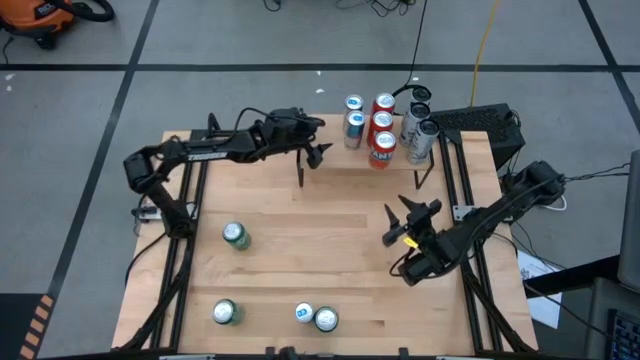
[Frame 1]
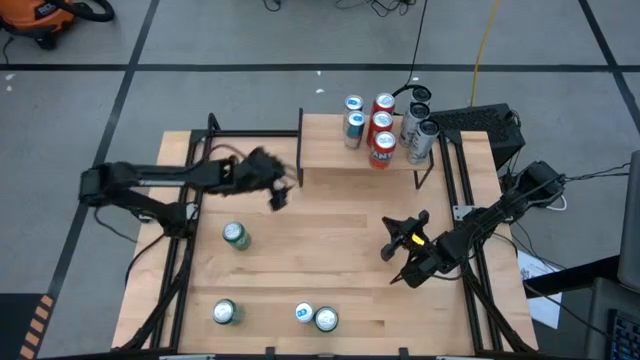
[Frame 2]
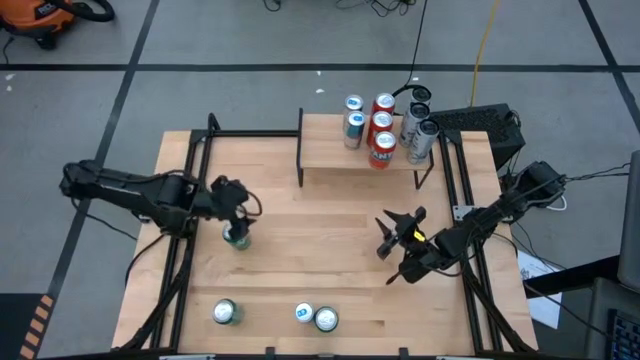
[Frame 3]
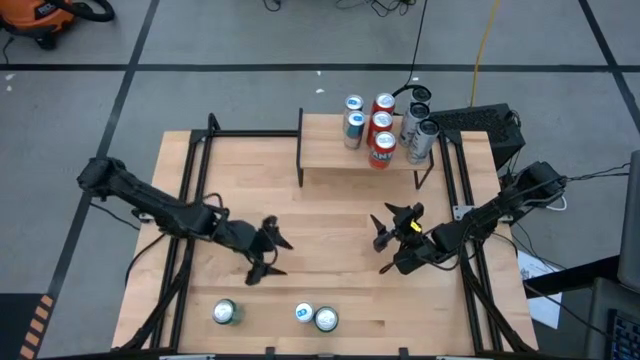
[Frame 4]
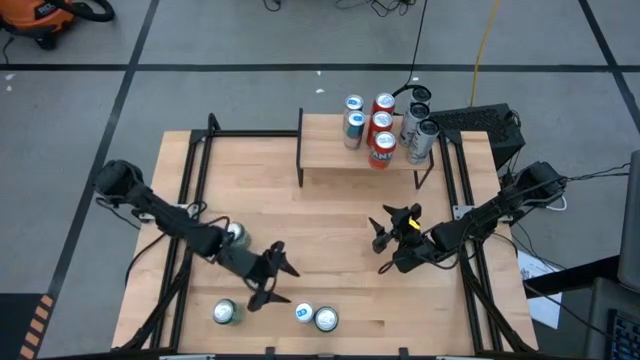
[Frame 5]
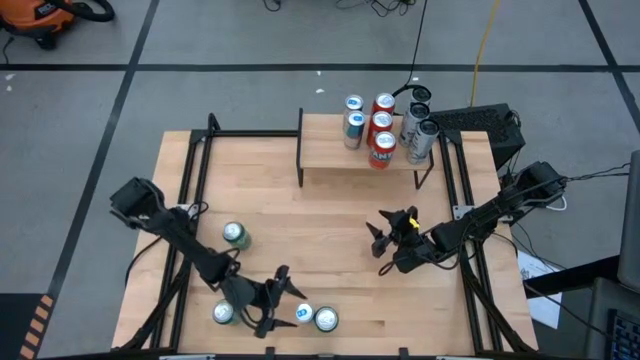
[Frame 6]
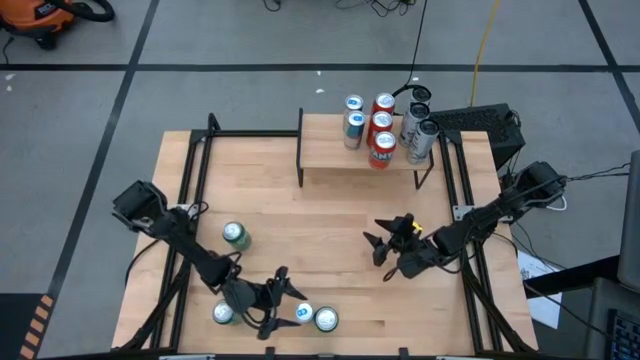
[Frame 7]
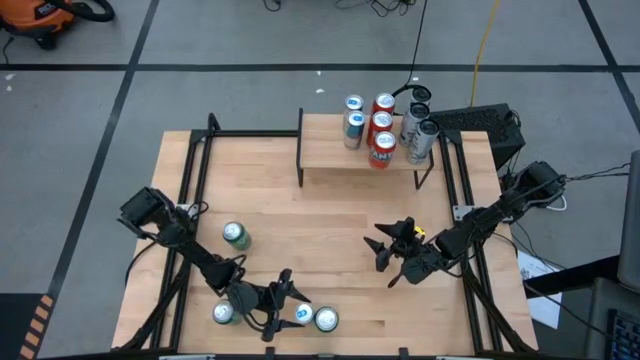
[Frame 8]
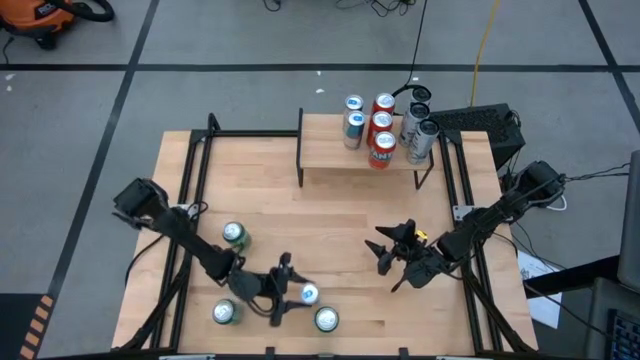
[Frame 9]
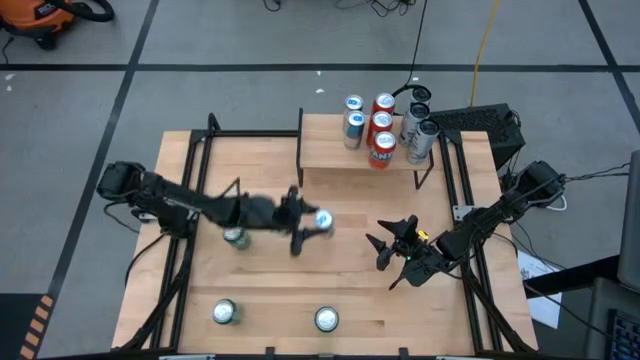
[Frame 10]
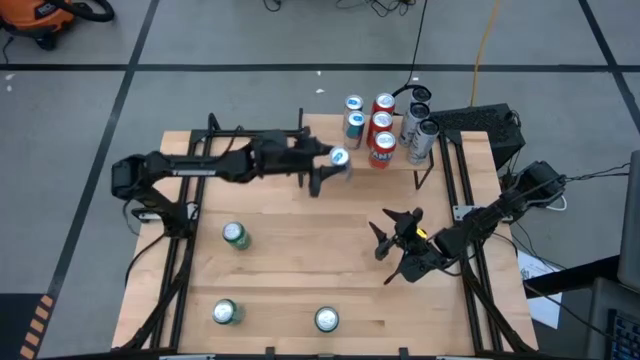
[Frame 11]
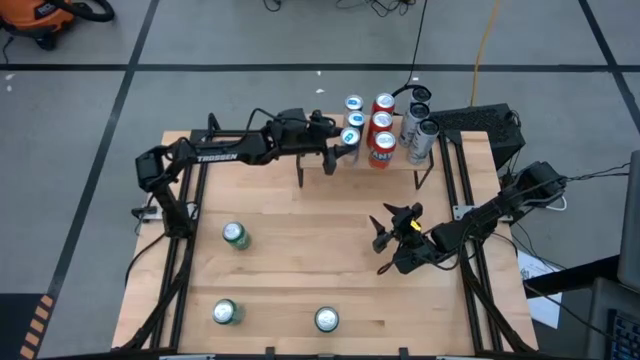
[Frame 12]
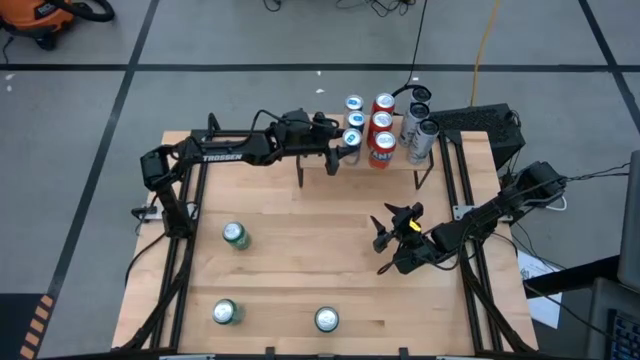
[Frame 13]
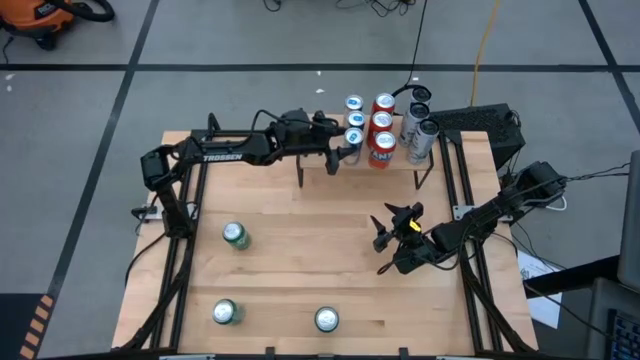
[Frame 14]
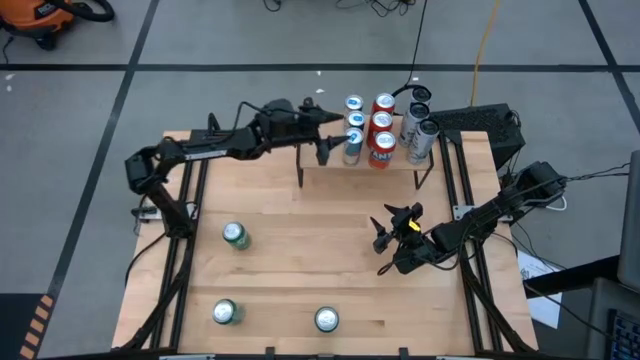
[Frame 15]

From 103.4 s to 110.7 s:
Task: Place canned beverage on shelf
Put the blue soda can on the shelf aligned with the other blue soda can

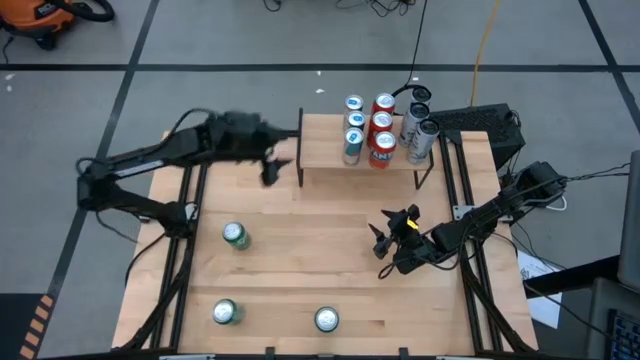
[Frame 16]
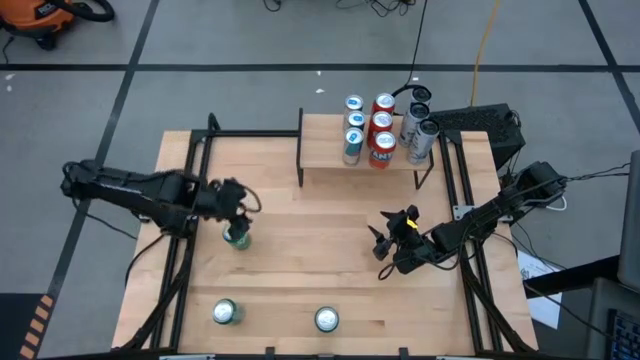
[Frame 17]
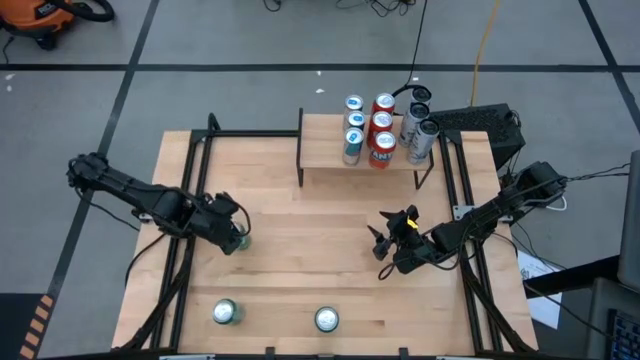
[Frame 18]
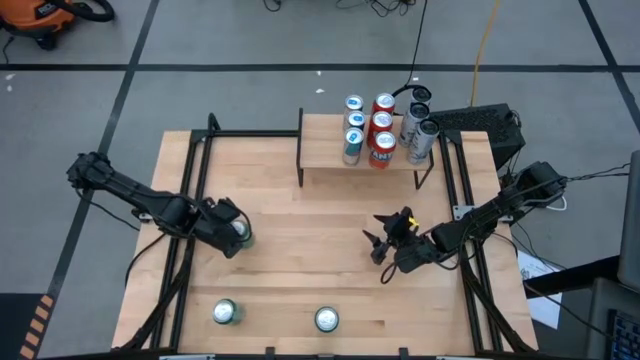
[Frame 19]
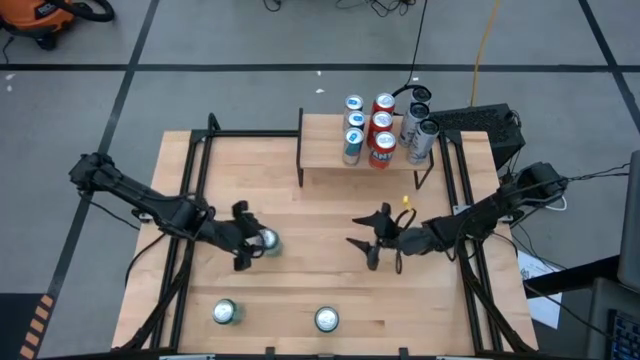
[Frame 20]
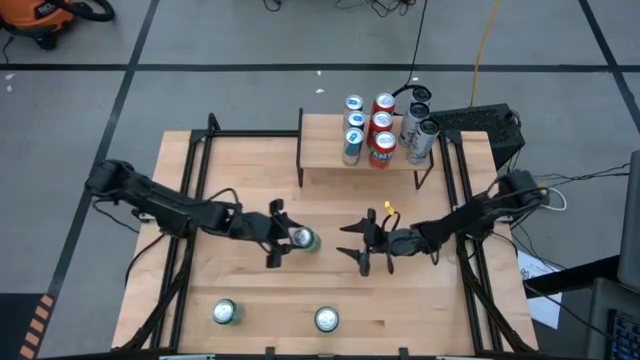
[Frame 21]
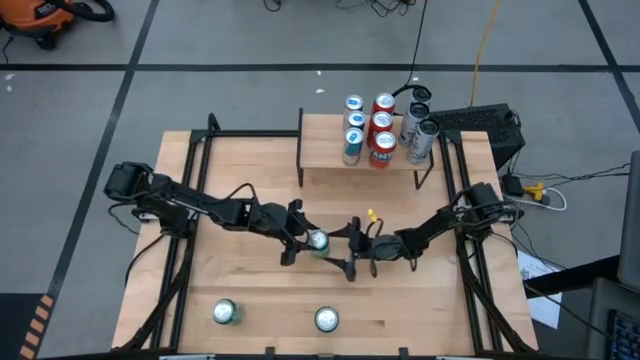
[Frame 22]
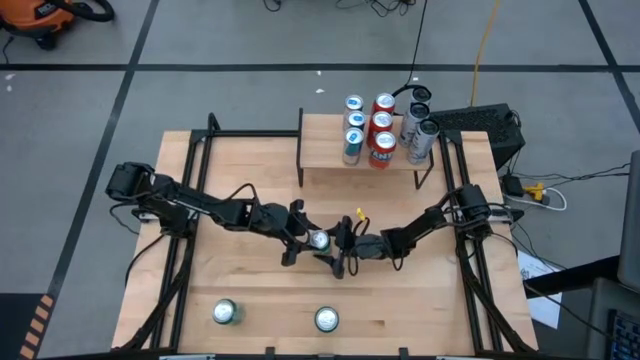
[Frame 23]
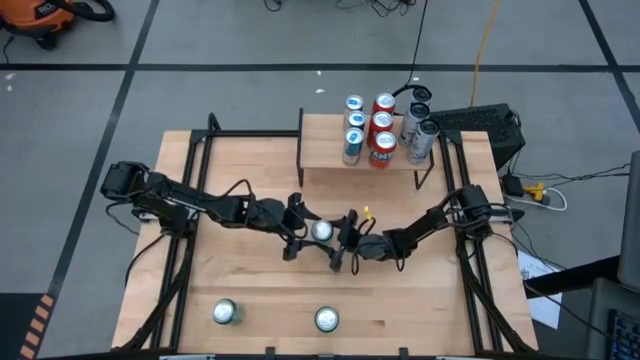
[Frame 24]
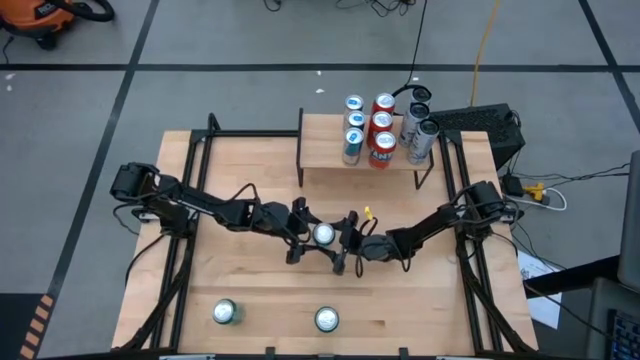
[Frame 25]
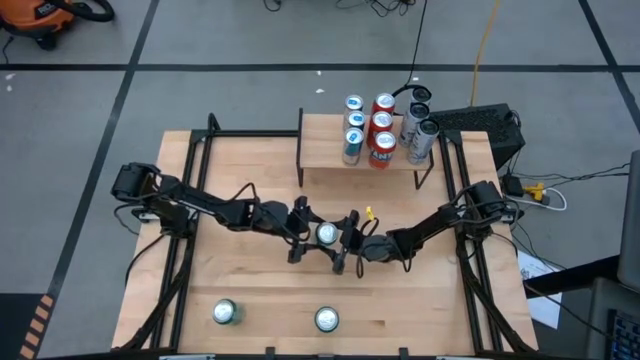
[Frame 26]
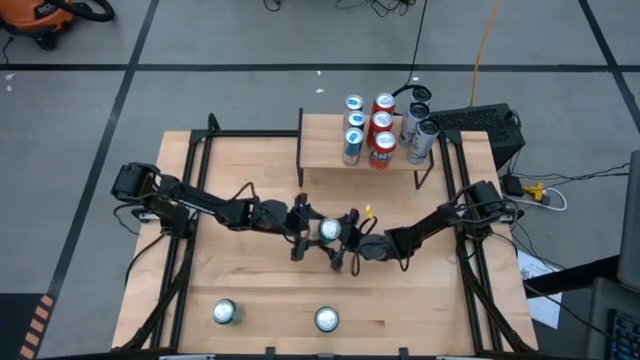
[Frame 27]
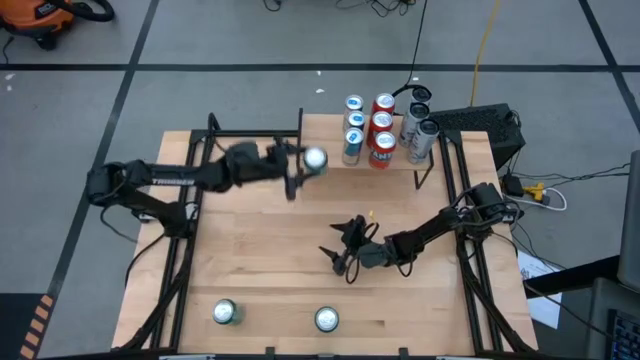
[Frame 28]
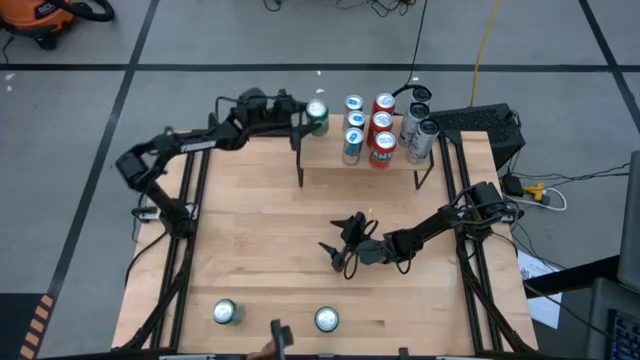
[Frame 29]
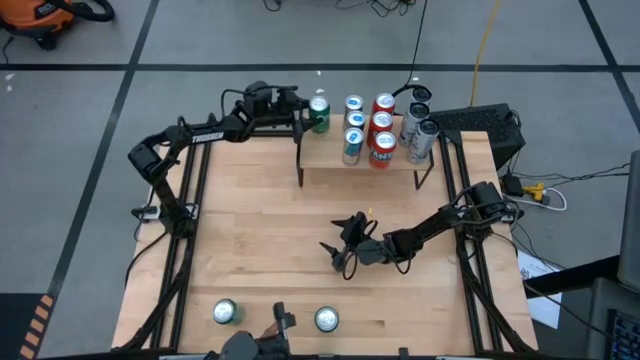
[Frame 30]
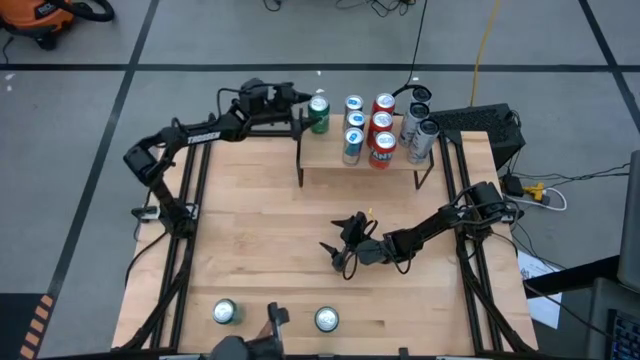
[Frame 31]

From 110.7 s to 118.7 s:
Put the top green soda can on the shelf

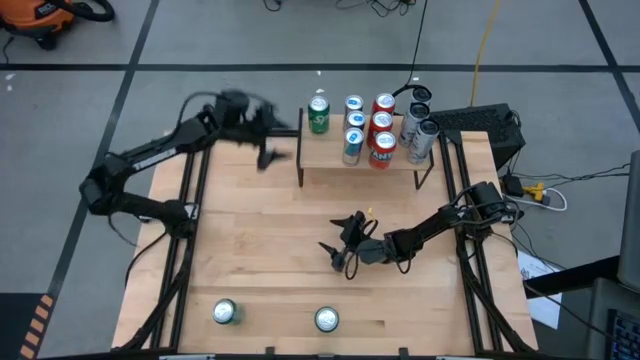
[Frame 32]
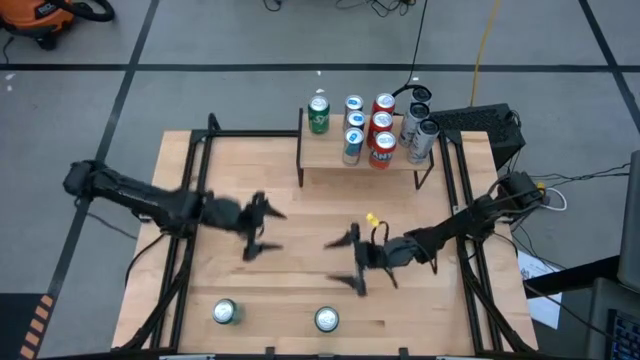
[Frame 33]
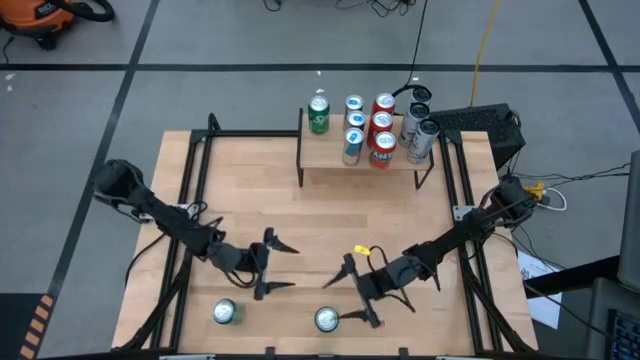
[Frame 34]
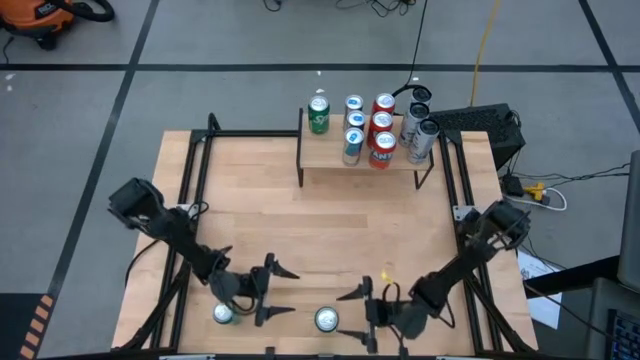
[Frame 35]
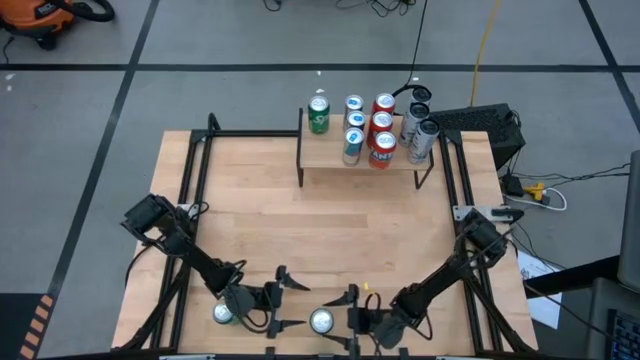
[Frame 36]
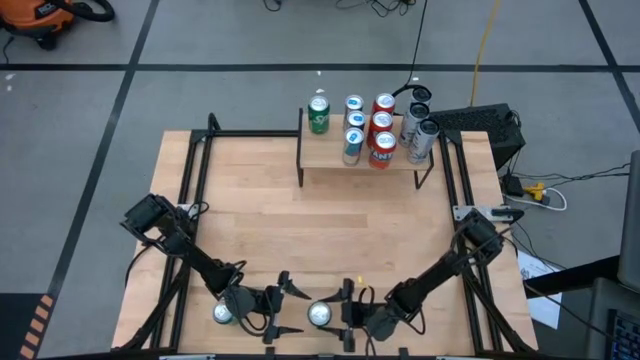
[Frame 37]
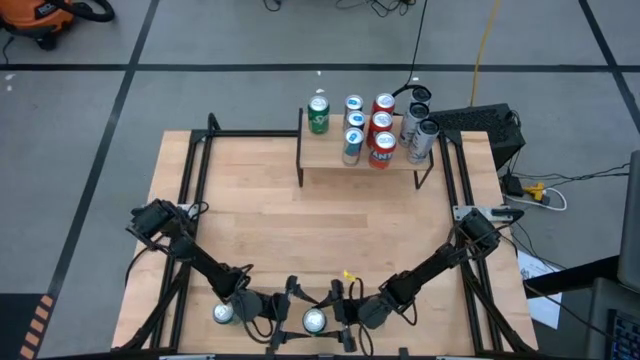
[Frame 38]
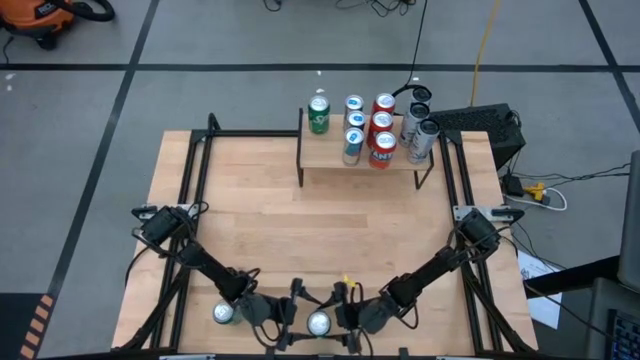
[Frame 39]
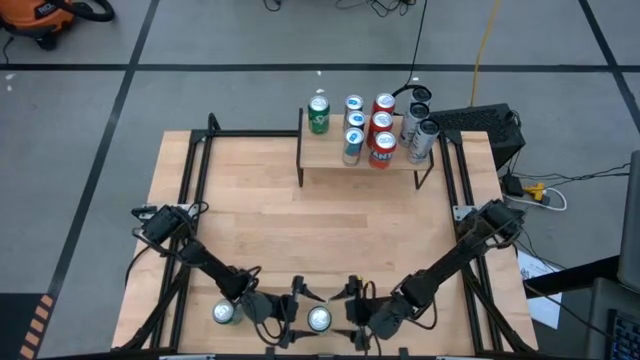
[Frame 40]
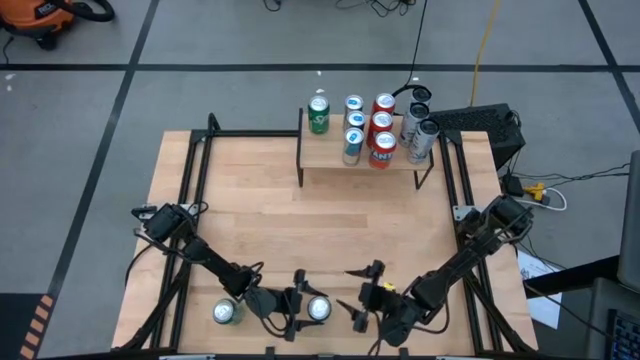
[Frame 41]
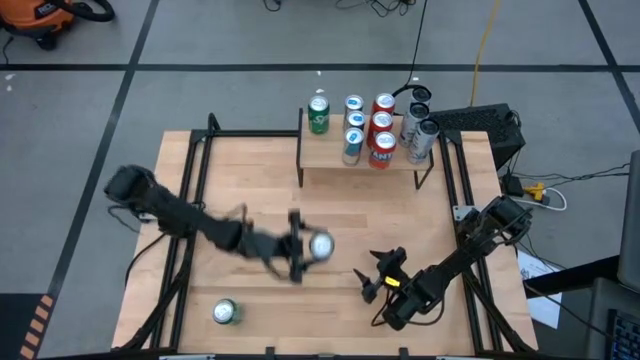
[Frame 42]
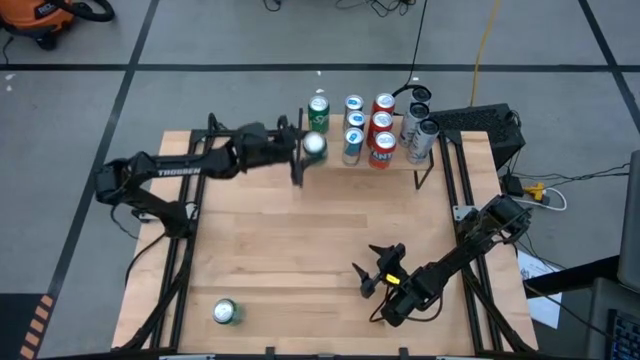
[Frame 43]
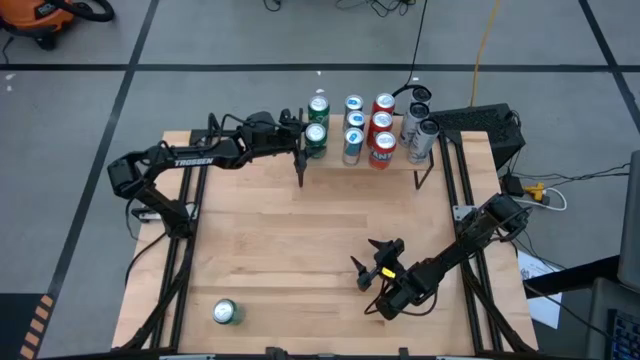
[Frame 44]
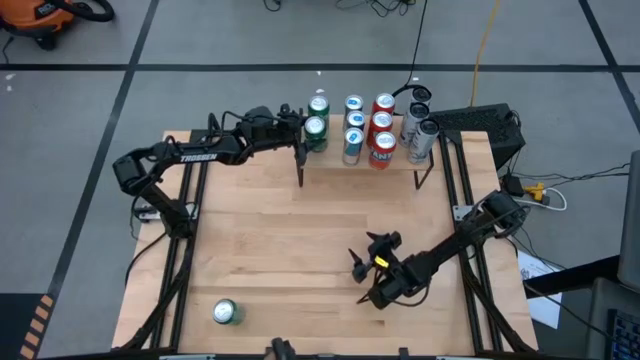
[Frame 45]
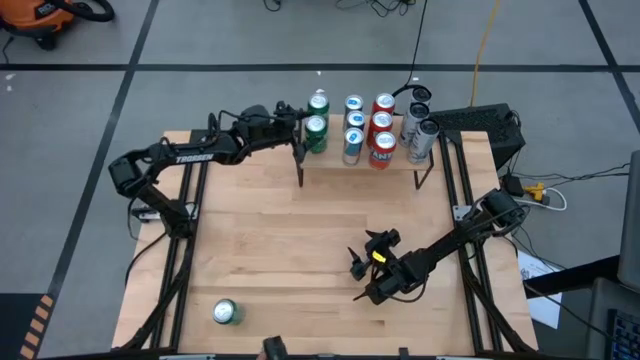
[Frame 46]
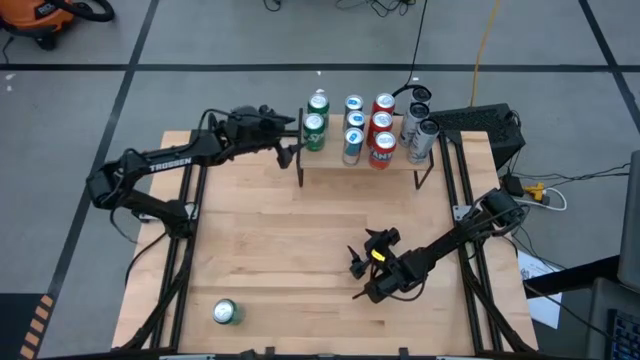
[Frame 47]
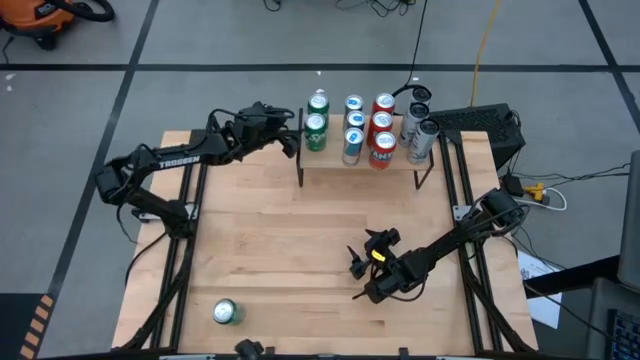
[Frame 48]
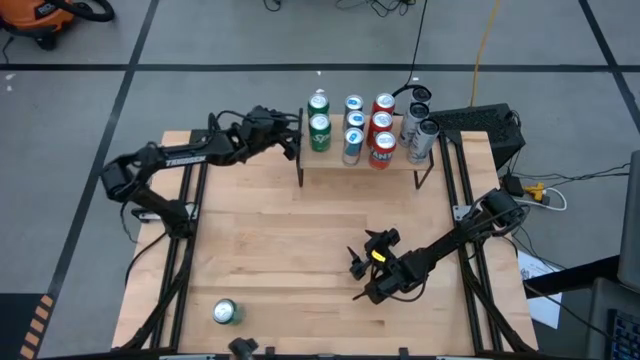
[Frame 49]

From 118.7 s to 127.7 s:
Put the right green soda can on the shelf aligned with the other green soda can
